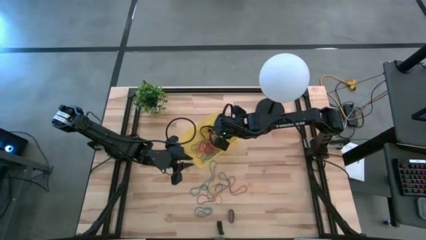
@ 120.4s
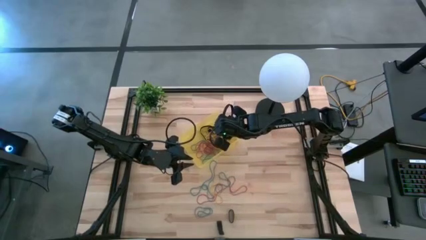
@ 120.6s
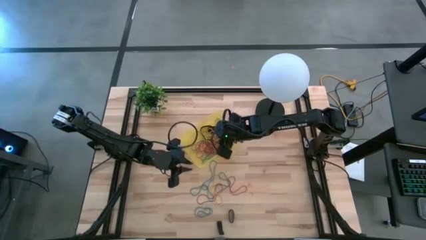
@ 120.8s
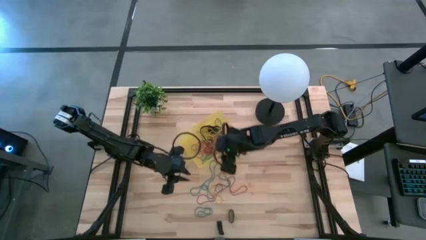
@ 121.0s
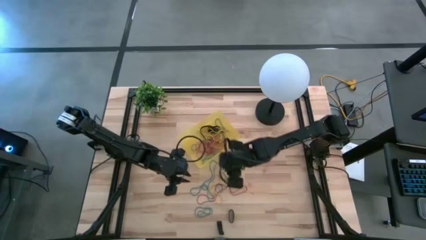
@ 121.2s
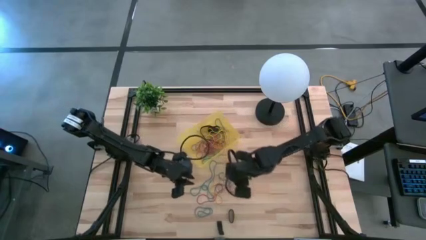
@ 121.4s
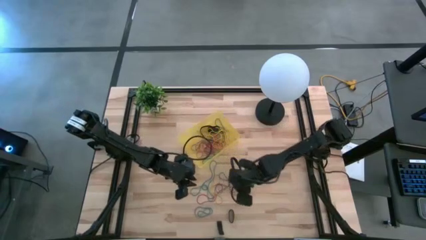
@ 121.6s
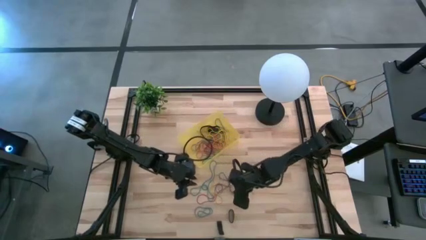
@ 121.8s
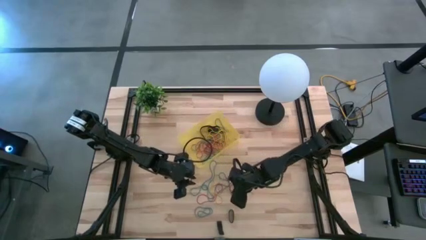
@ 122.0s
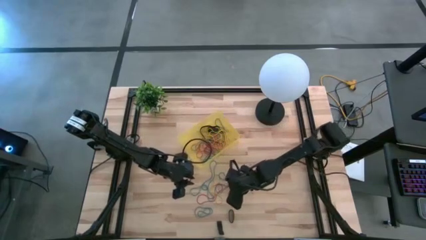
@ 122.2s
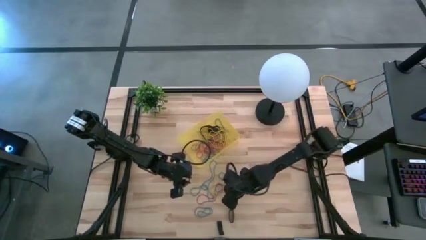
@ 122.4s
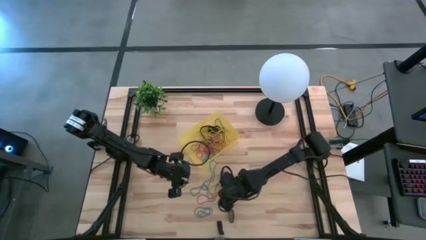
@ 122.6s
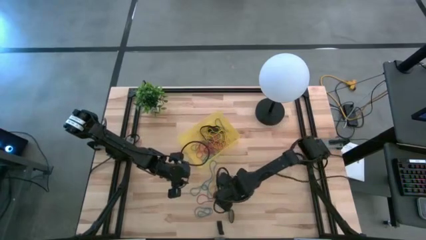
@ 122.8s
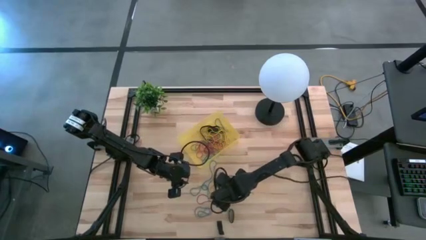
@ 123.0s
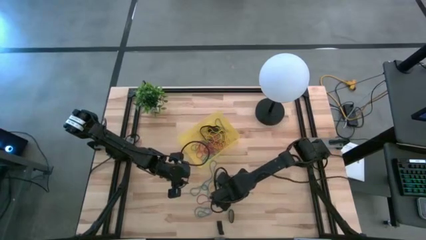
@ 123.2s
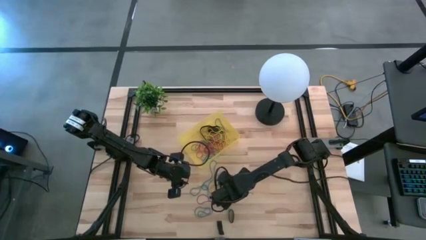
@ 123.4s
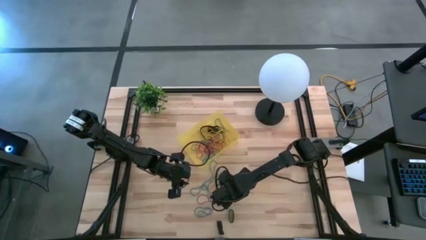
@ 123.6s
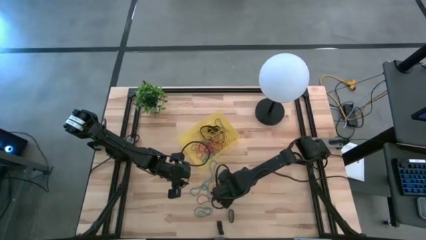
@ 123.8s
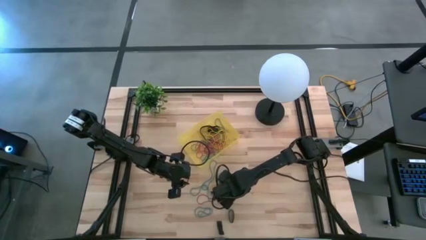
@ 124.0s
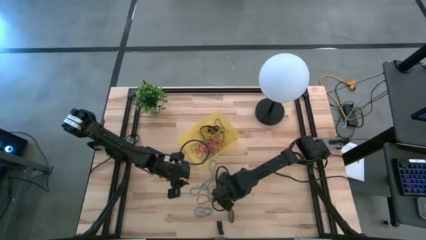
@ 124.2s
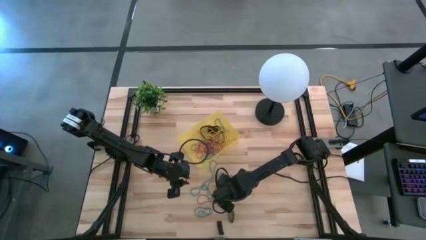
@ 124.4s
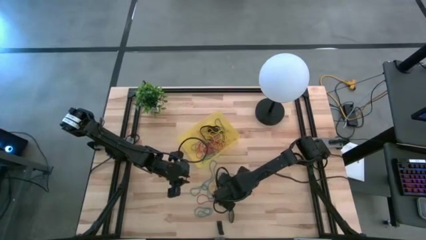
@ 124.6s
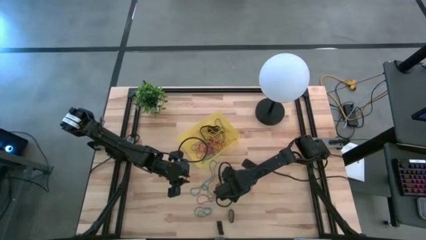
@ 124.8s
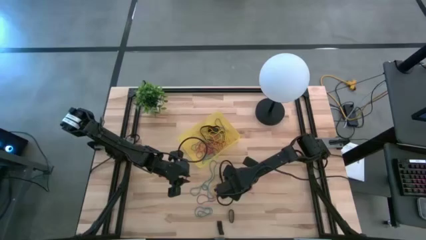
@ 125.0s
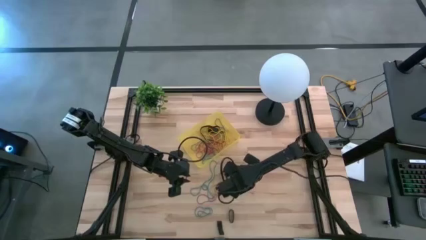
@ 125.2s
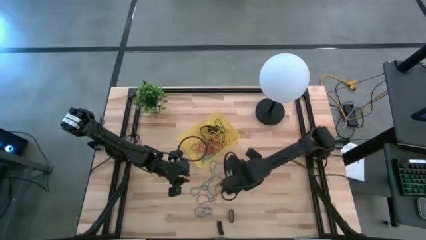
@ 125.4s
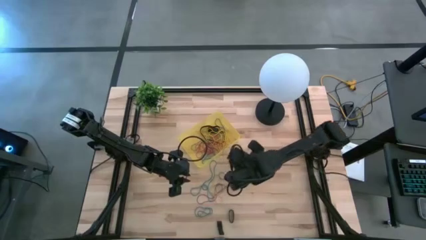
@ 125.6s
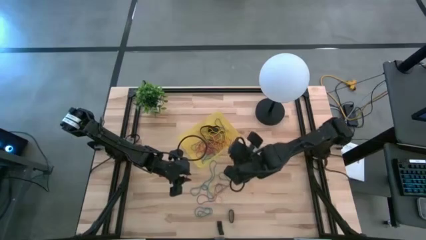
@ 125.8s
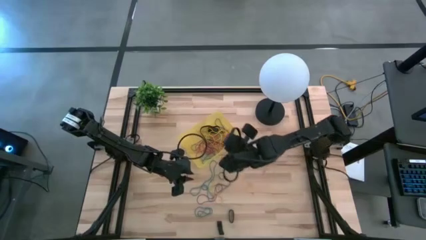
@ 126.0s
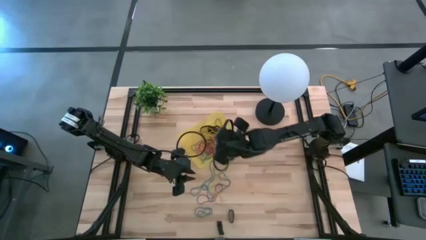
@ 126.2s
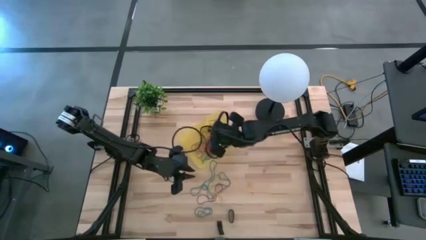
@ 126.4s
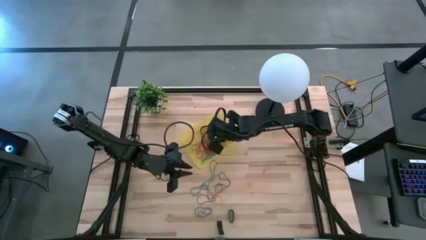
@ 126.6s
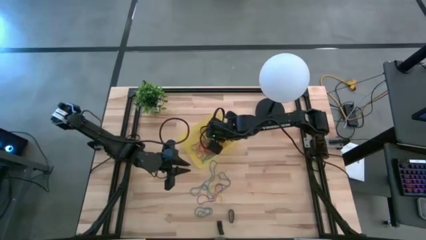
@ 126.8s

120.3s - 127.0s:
Task: Pick and place rubber bands into bin
Put the red rubber band into the yellow bin

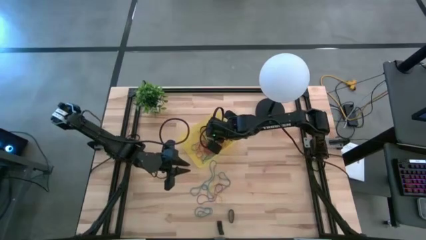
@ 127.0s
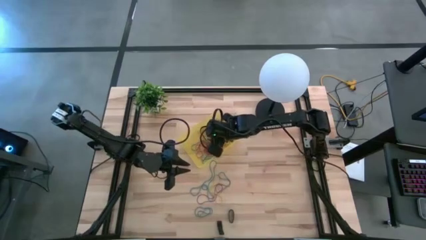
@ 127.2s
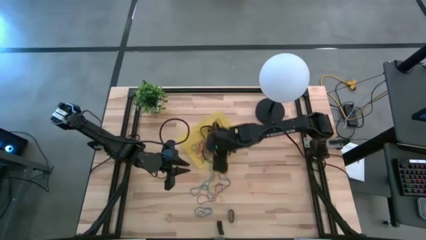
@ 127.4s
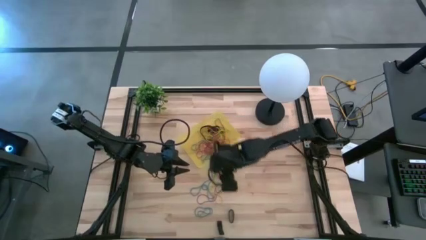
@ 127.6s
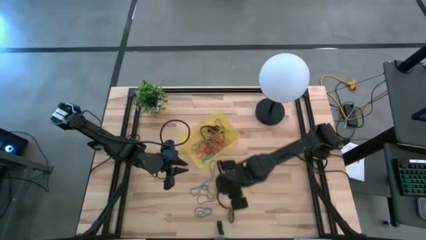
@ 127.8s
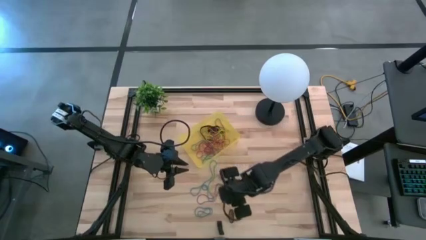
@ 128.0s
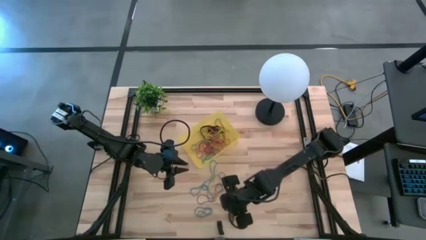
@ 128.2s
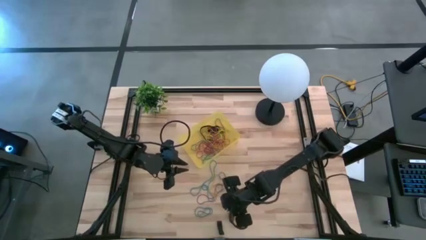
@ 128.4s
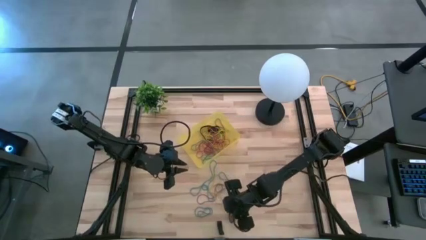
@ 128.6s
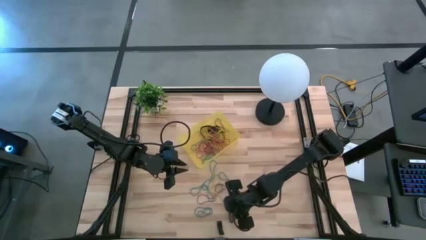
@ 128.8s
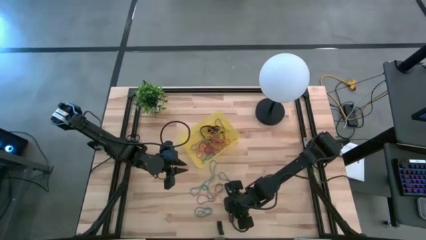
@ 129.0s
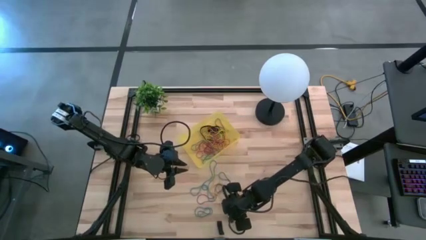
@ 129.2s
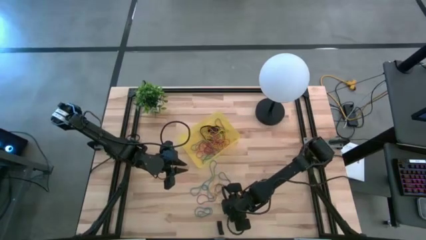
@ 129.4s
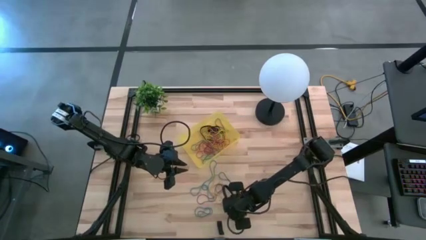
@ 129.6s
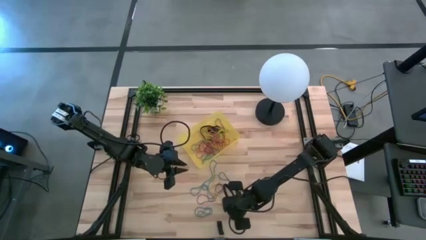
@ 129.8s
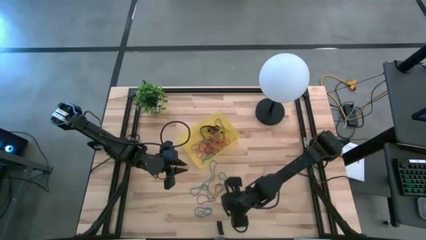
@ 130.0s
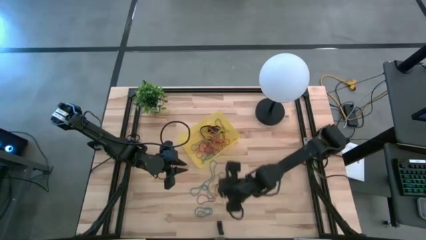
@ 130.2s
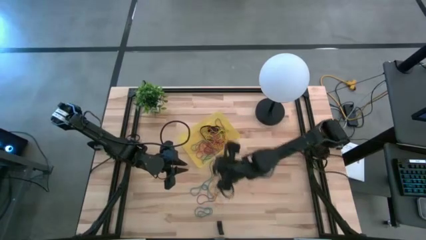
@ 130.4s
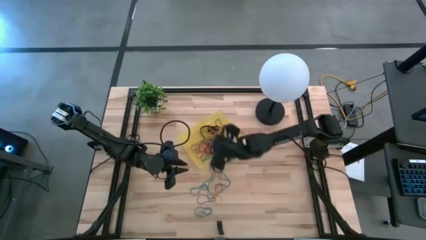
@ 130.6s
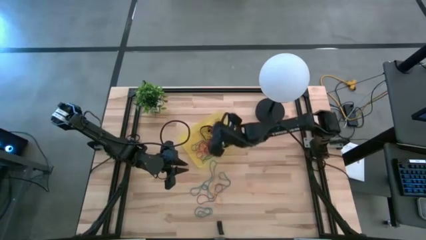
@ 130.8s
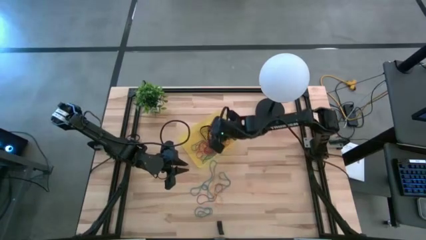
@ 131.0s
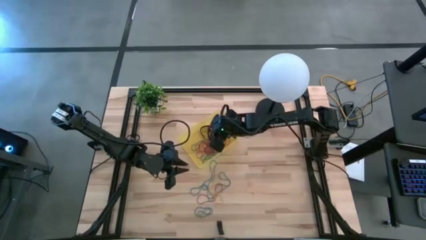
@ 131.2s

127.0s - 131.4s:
Put the black rubber band into the yellow bin

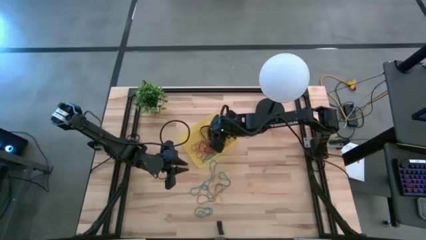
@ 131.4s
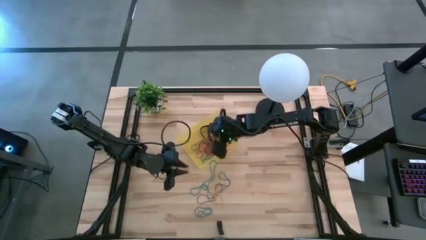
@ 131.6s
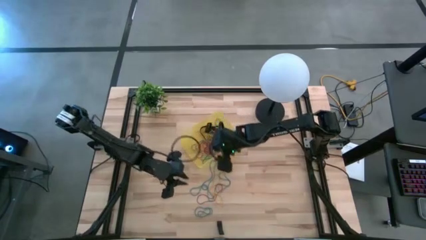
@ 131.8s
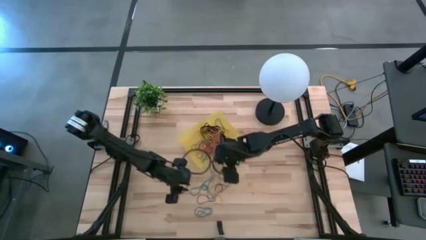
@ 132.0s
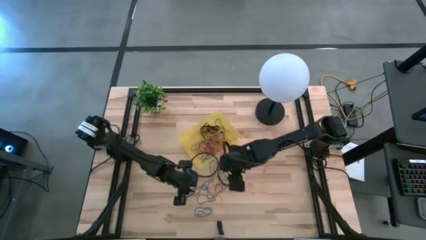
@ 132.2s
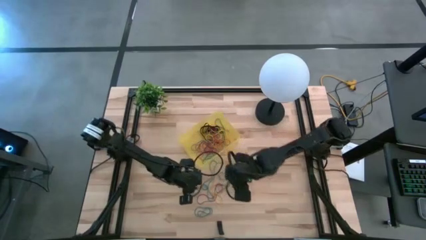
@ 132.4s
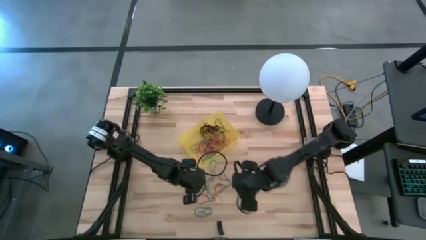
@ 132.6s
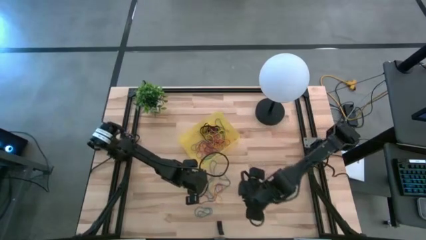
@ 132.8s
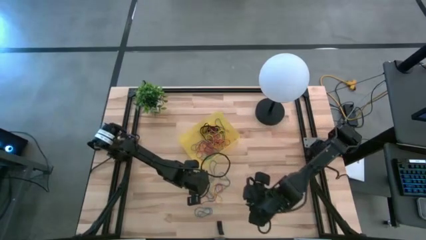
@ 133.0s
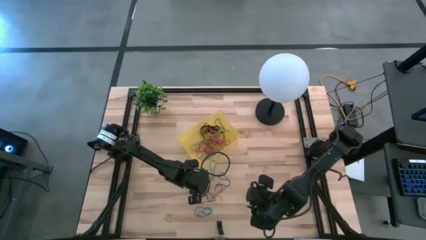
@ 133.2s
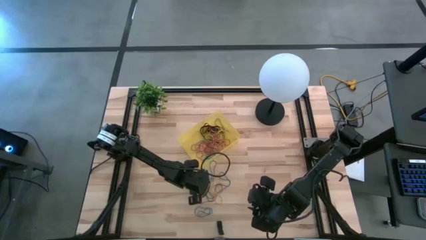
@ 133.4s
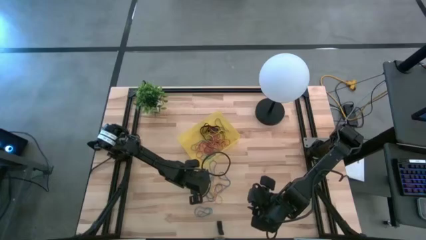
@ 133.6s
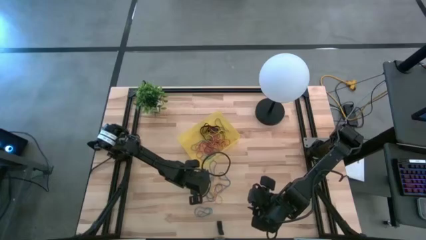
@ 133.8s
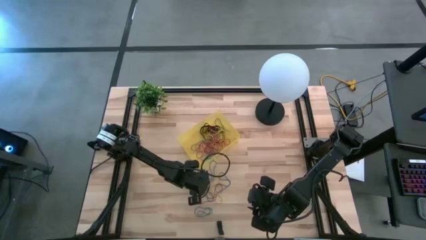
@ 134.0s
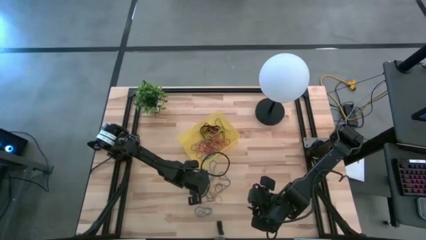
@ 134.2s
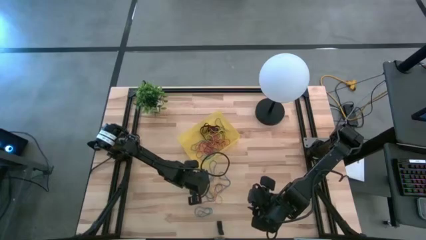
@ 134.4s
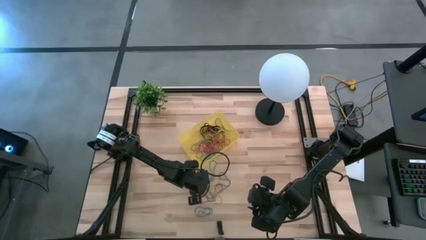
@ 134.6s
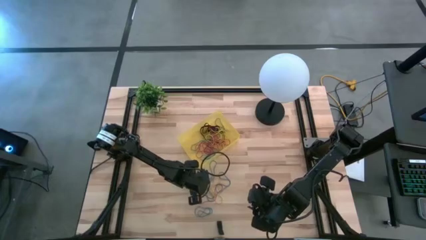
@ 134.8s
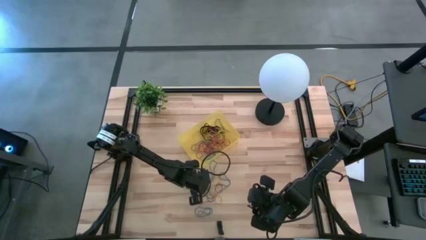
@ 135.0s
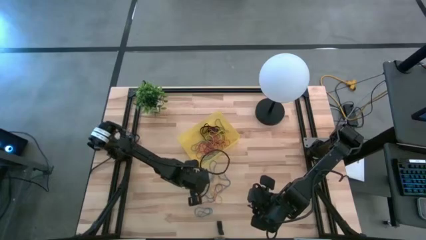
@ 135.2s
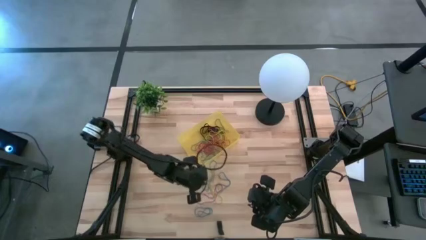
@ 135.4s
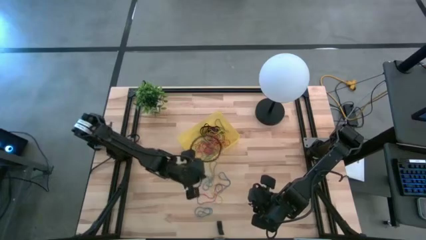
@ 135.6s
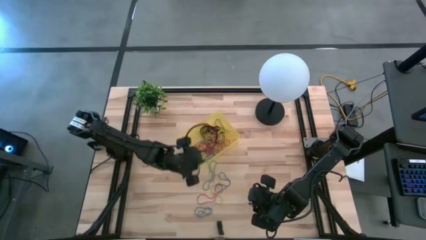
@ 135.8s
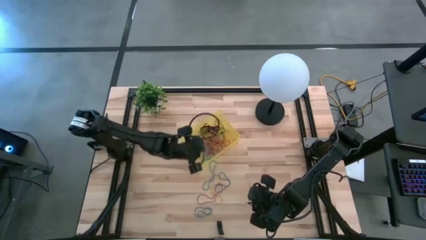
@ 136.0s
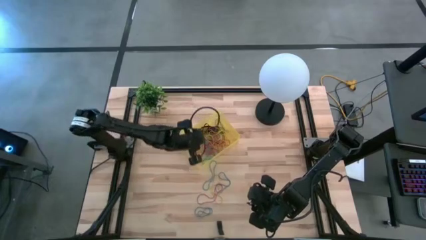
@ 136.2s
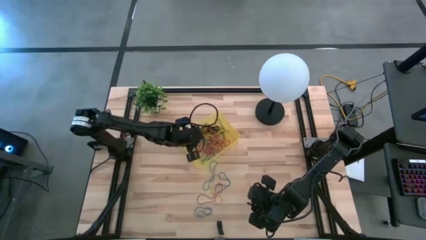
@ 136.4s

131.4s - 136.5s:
Put the blue rubber band into the yellow bin
